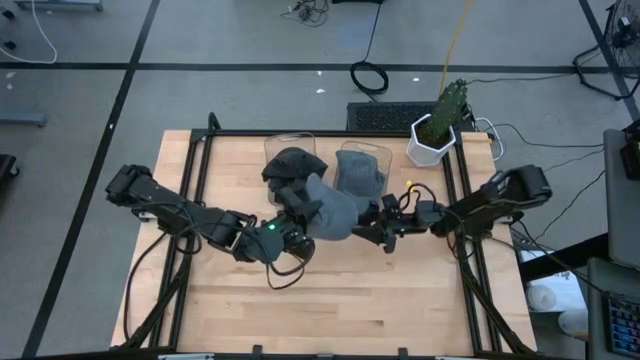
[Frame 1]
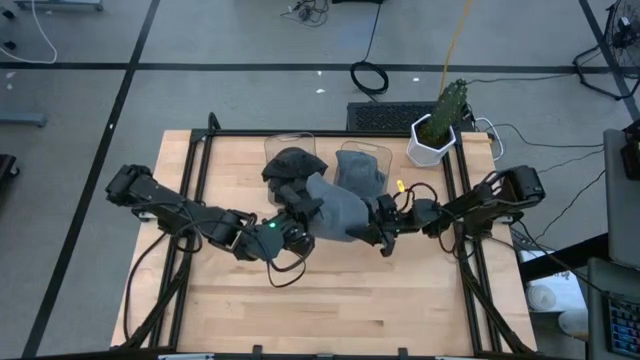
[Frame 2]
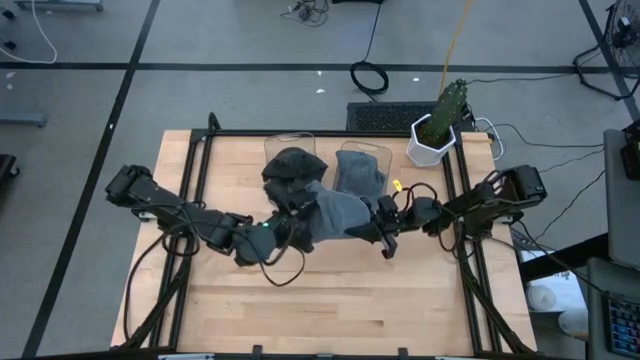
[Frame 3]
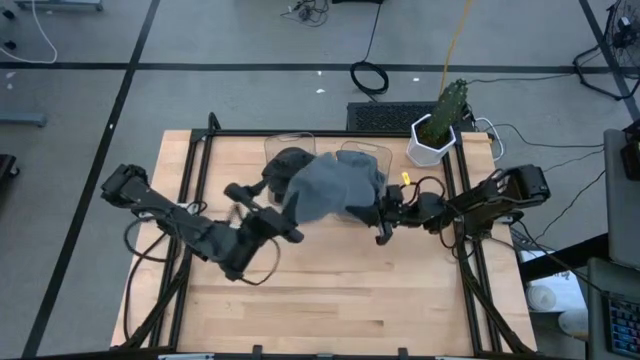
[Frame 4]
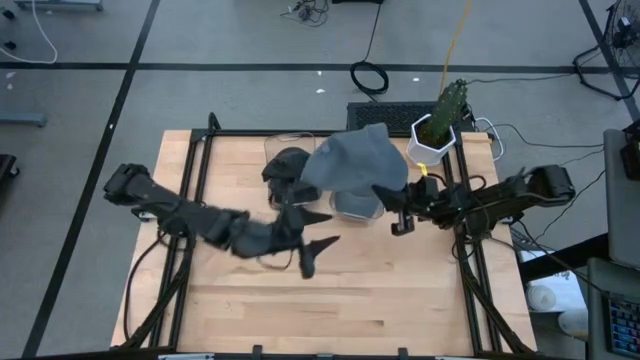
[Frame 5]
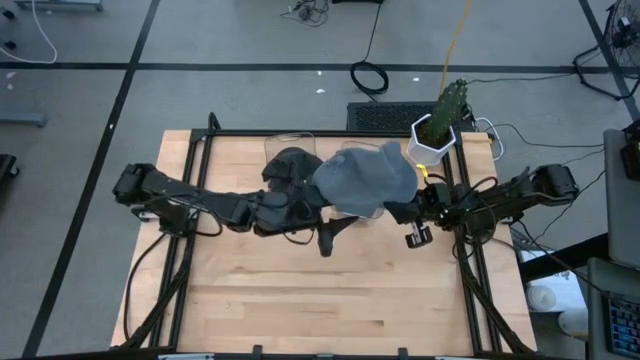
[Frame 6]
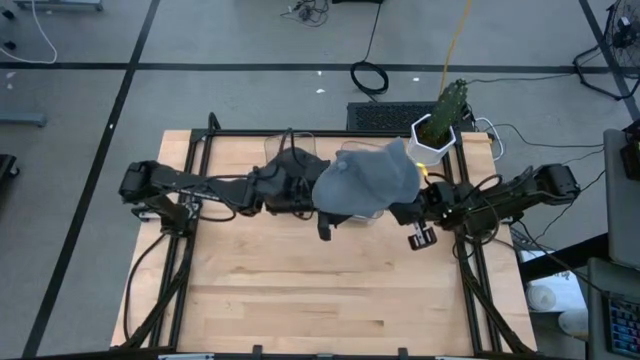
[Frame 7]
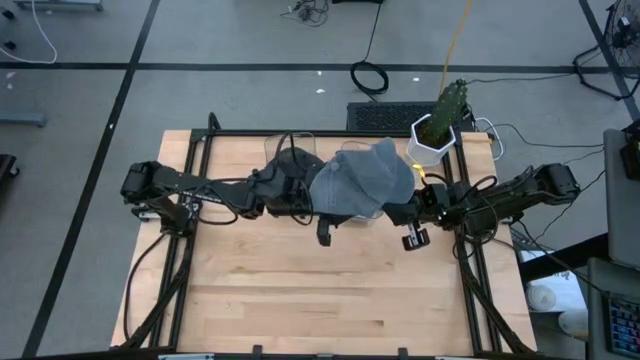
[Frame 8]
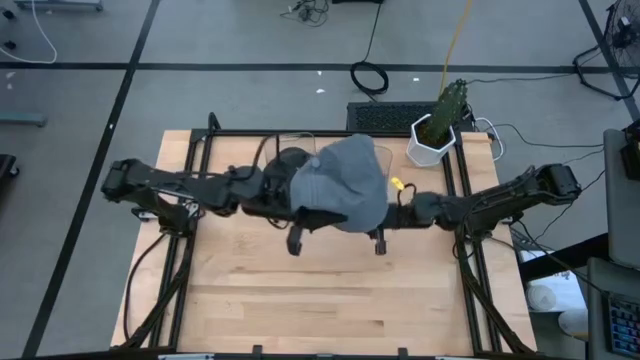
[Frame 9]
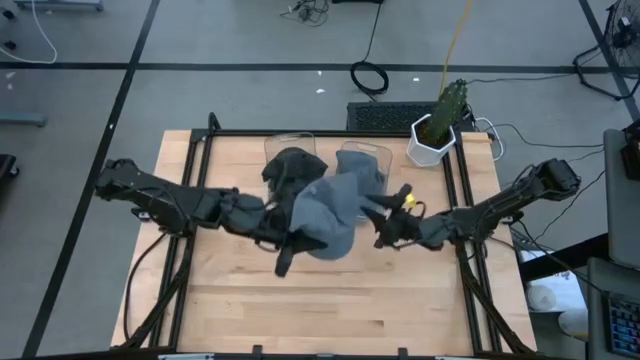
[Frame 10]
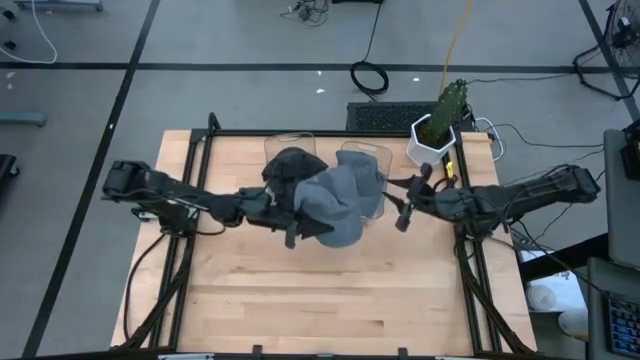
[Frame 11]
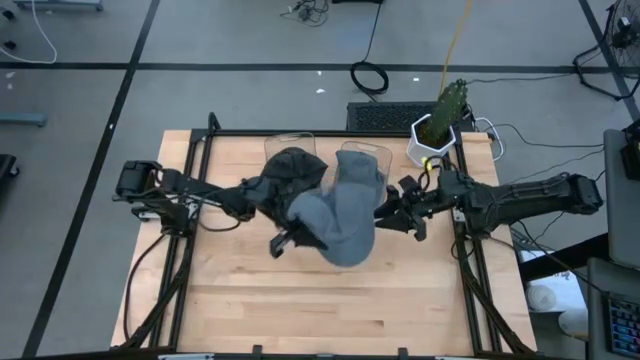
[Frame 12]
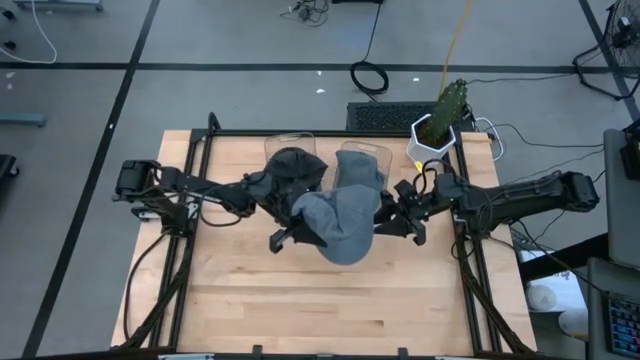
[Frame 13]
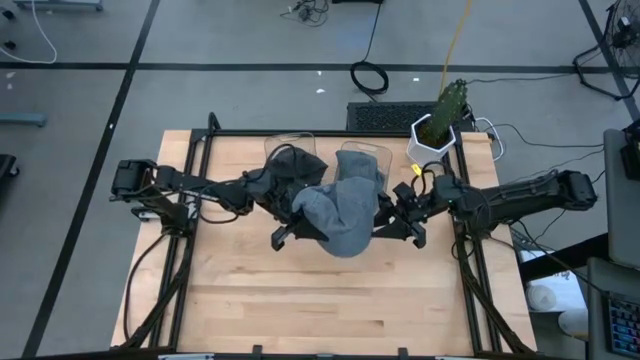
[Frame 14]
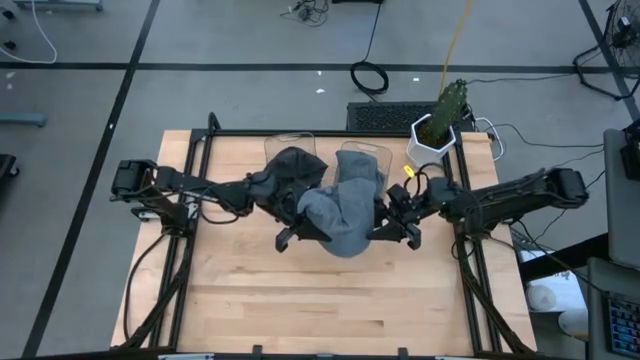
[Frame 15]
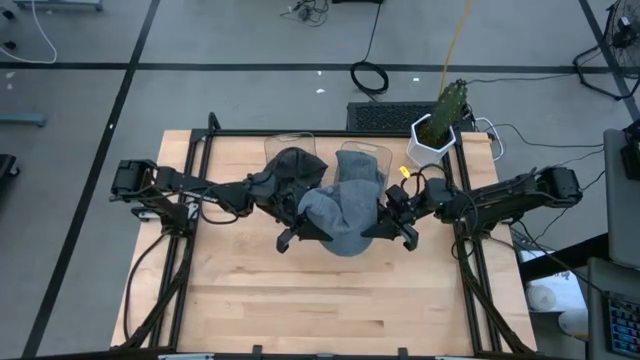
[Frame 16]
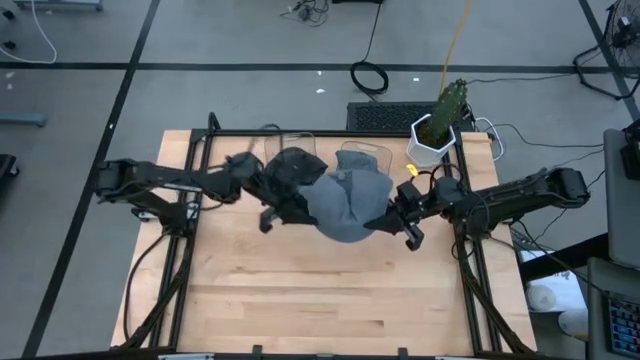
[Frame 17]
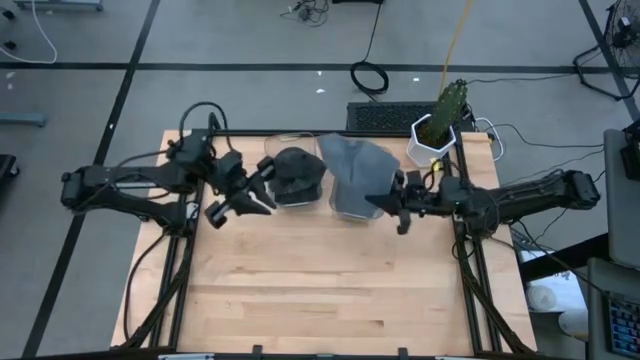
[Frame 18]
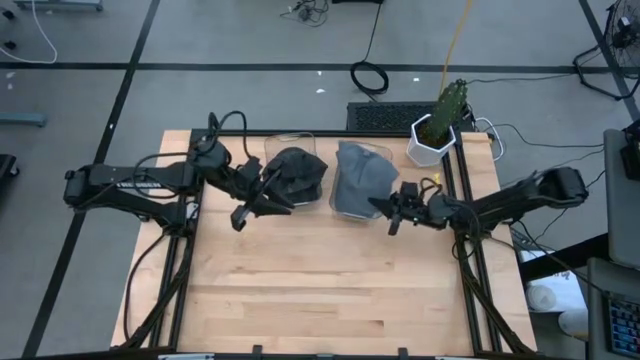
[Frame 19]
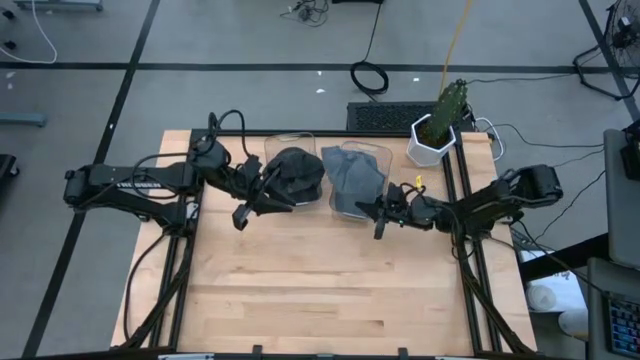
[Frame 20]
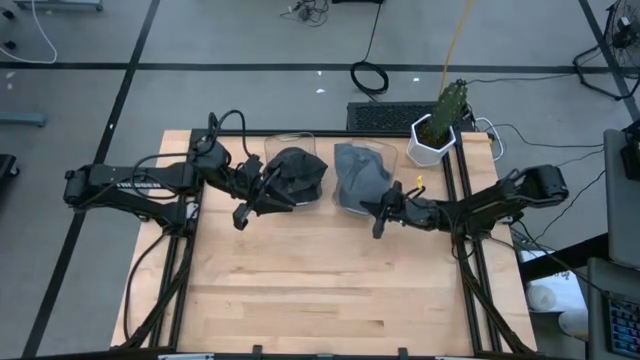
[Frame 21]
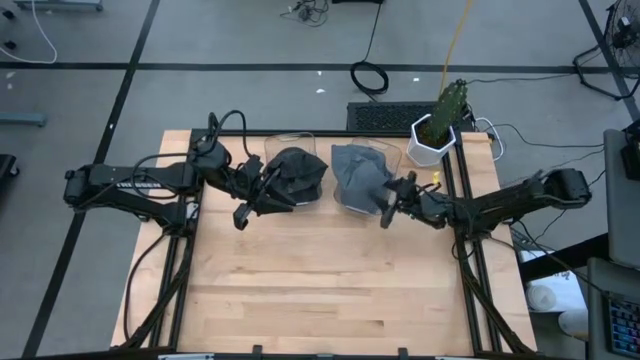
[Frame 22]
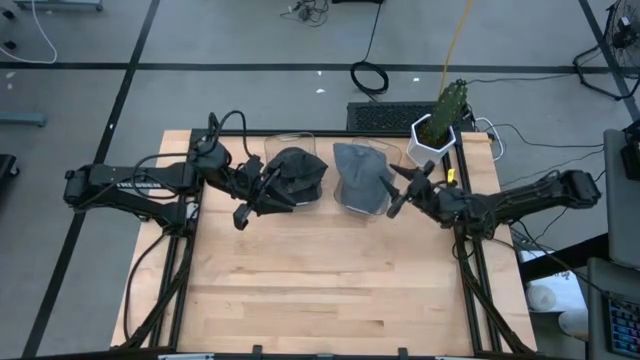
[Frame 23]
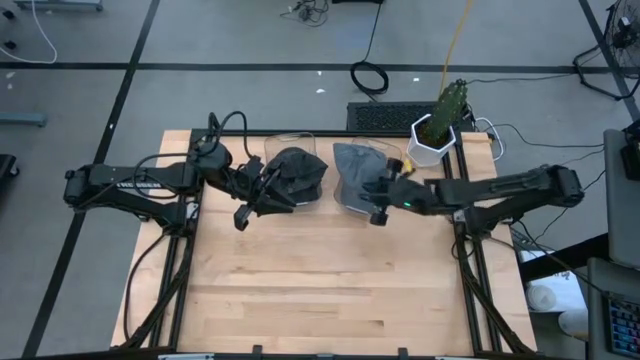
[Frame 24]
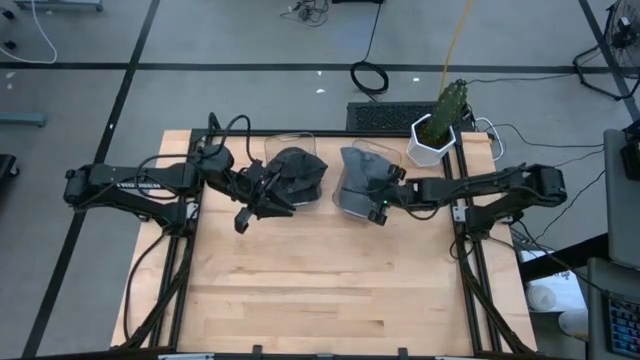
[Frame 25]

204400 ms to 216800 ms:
Task: Pick & Place hat
Put the gray cap into the right transparent bin

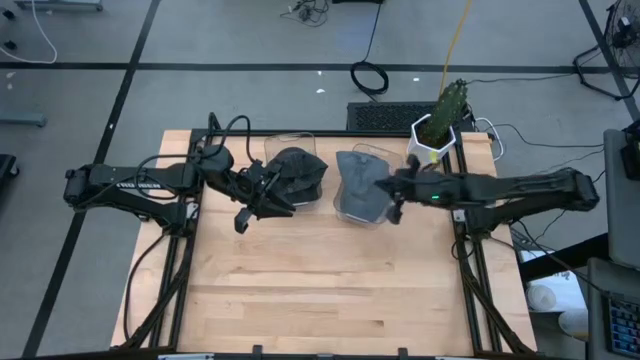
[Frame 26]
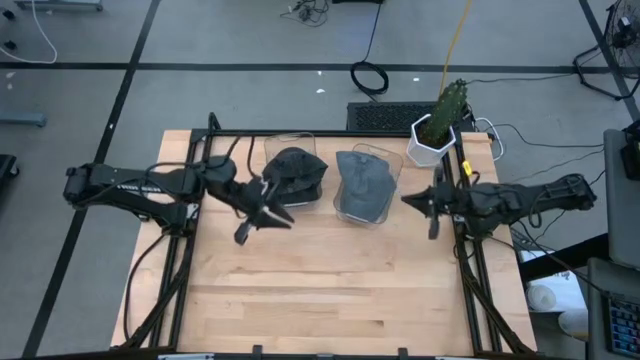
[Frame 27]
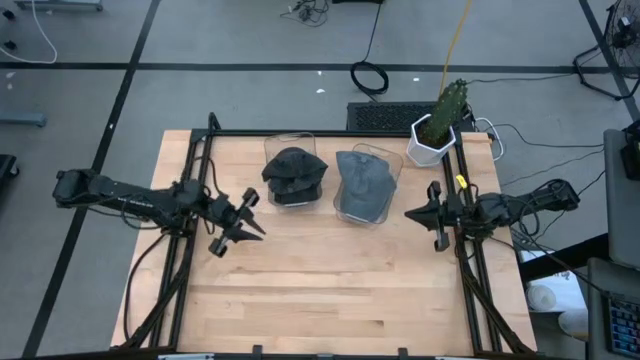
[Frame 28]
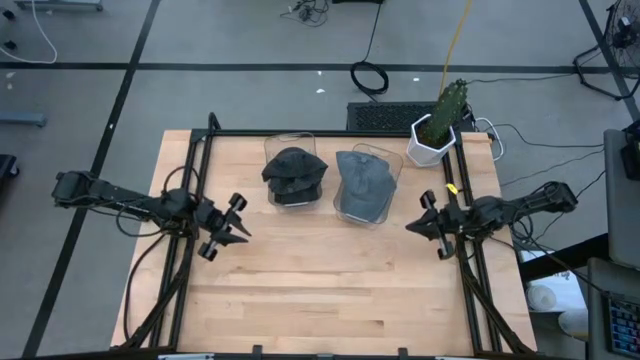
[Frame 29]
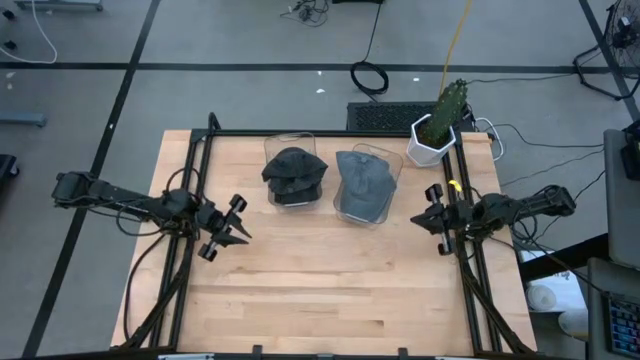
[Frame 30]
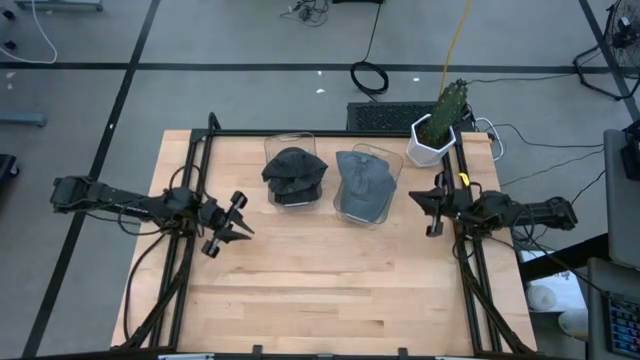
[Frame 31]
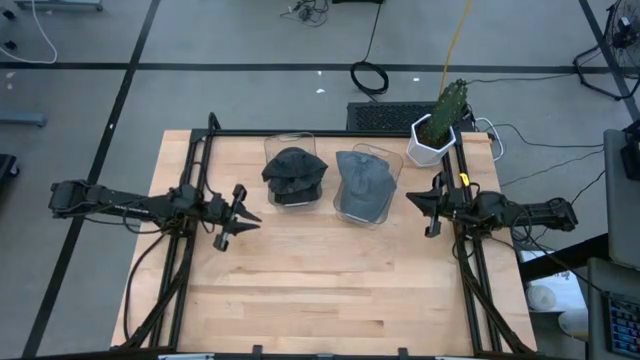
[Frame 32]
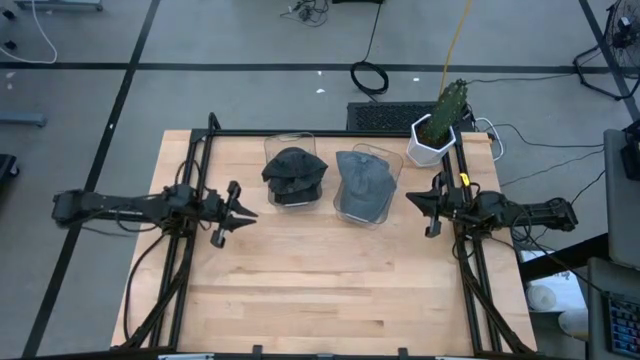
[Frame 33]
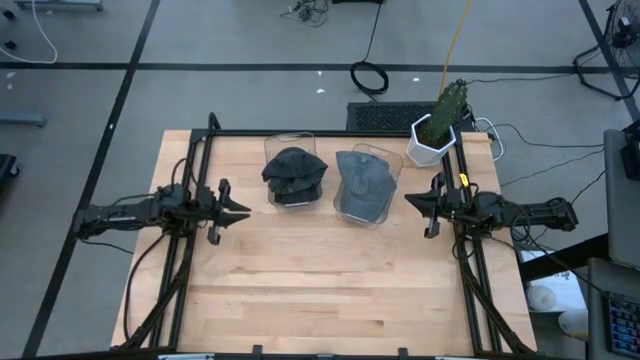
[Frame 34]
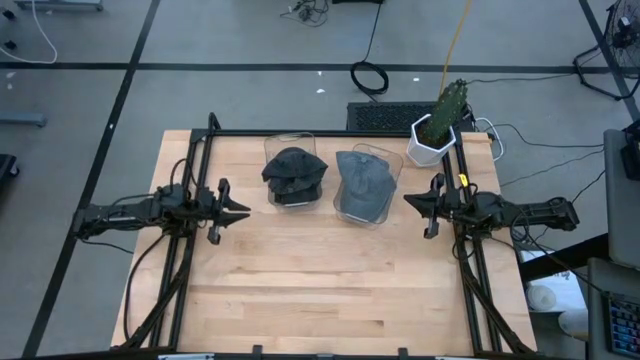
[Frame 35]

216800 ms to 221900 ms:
Return to Home Position

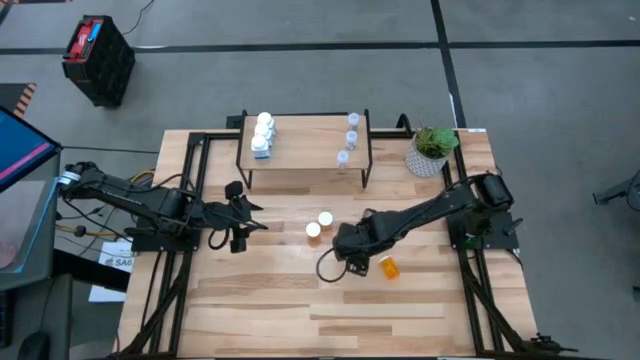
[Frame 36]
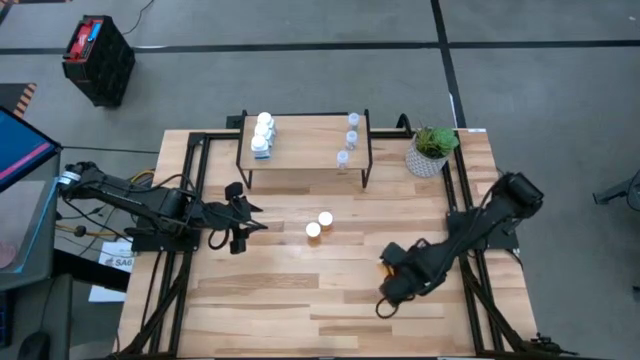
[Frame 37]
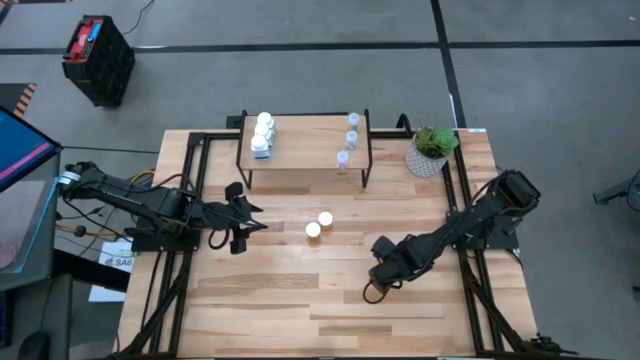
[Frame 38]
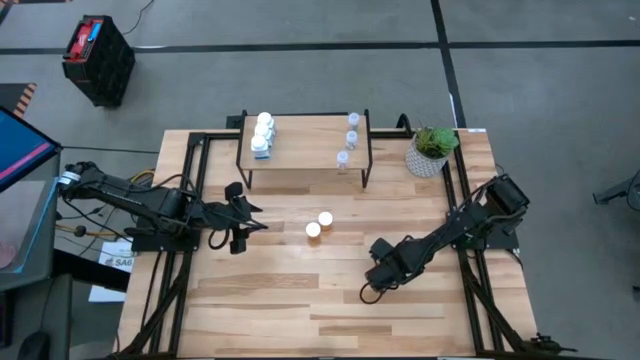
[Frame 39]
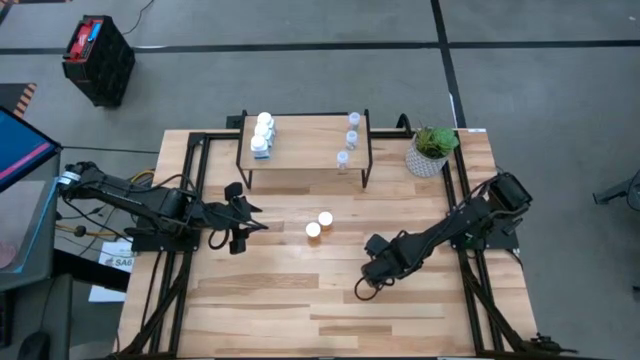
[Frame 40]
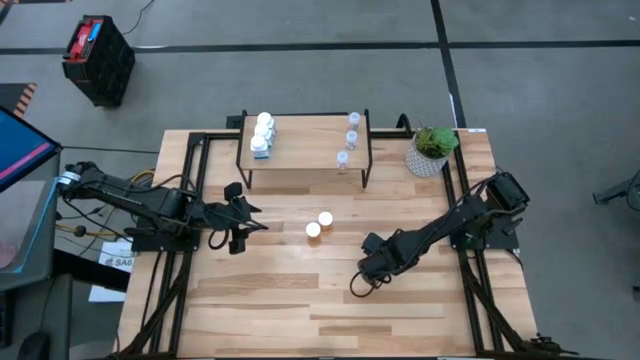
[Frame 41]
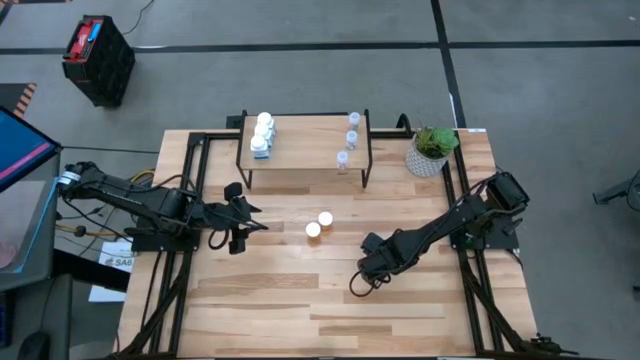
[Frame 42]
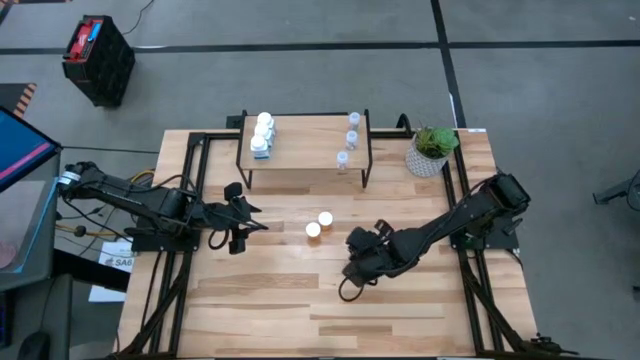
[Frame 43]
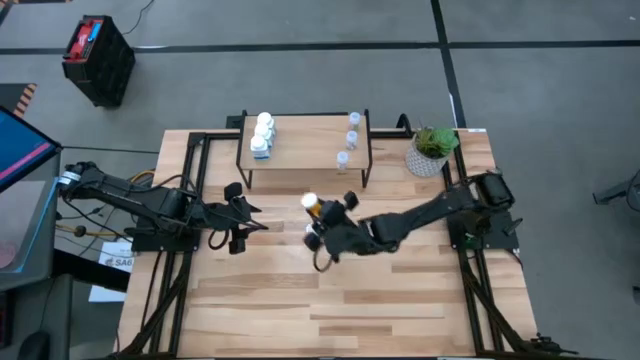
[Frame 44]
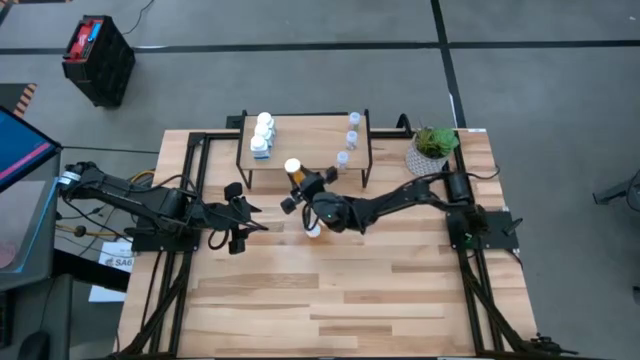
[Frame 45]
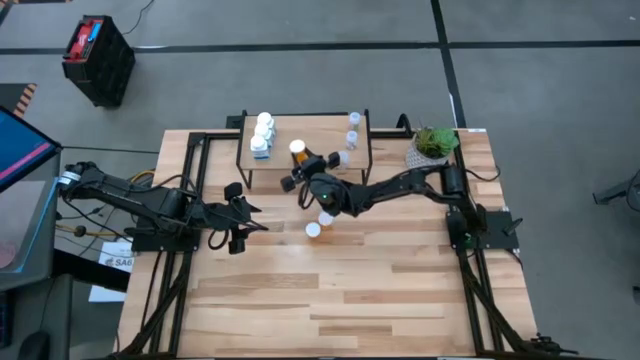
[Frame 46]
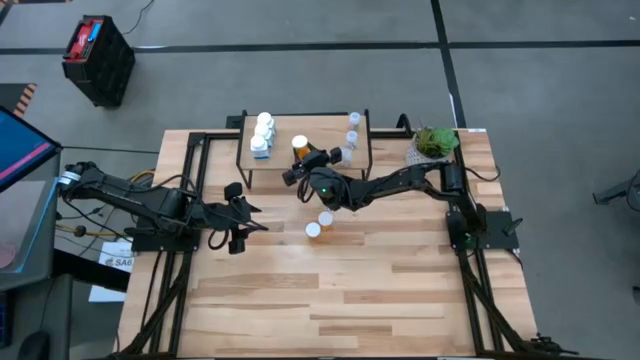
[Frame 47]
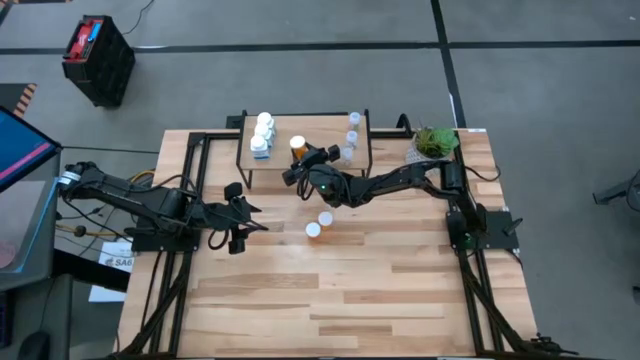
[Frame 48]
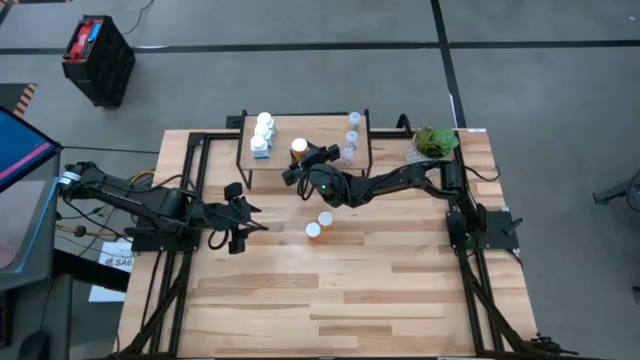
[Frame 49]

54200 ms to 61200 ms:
Task: Pick and place medicine bottles onto shelf by color
Put the bottom orange pill bottle on the shelf
